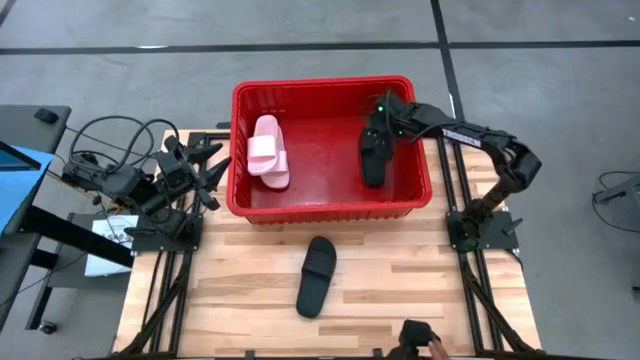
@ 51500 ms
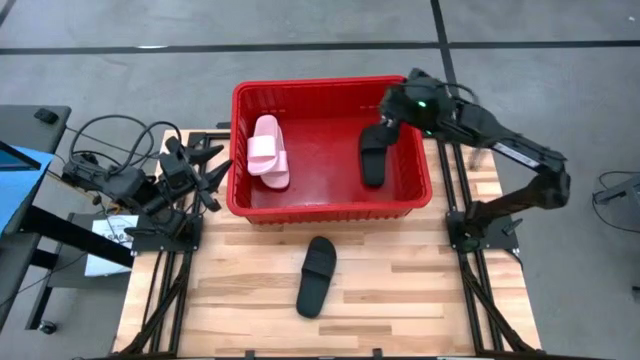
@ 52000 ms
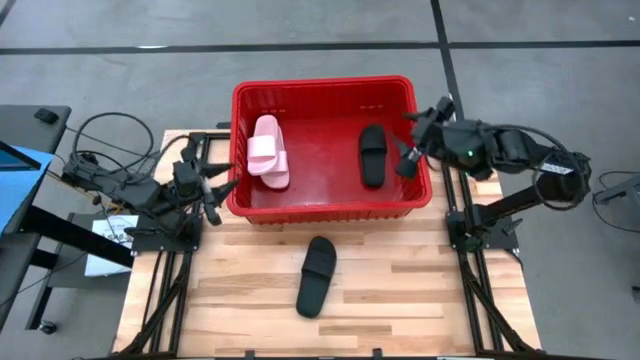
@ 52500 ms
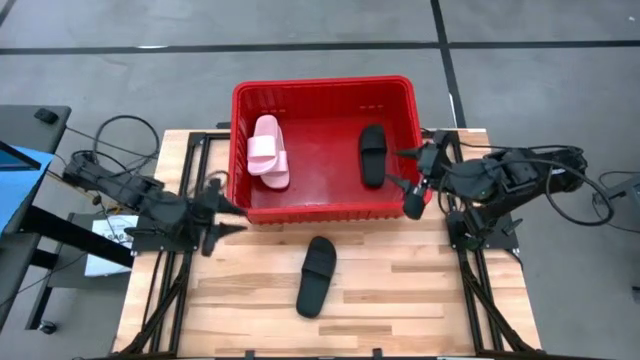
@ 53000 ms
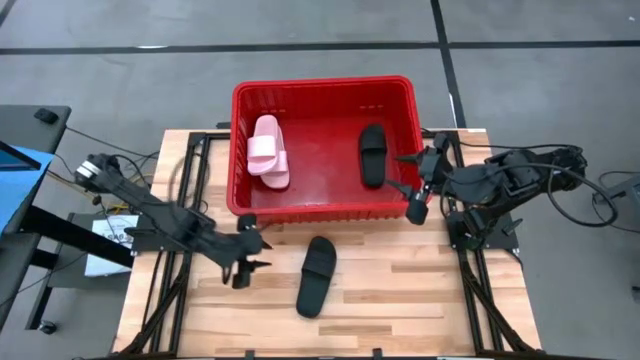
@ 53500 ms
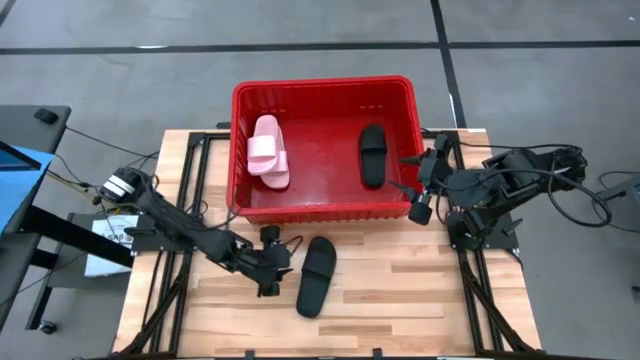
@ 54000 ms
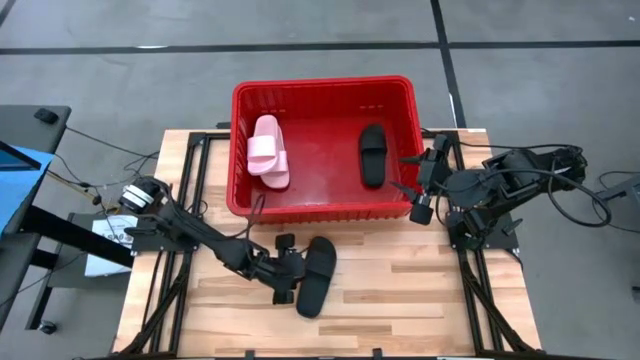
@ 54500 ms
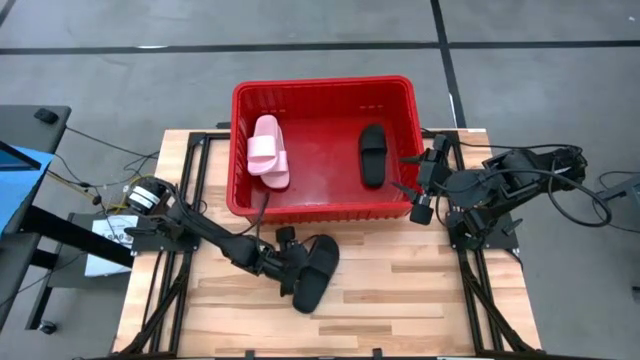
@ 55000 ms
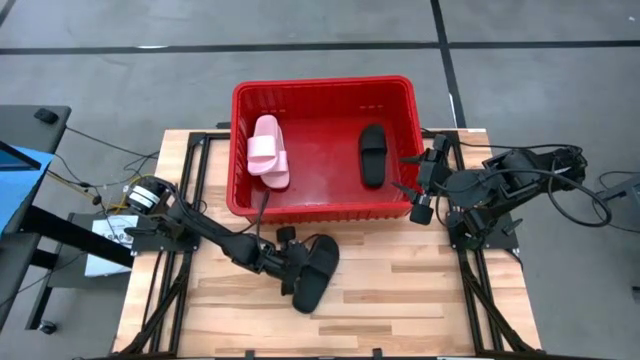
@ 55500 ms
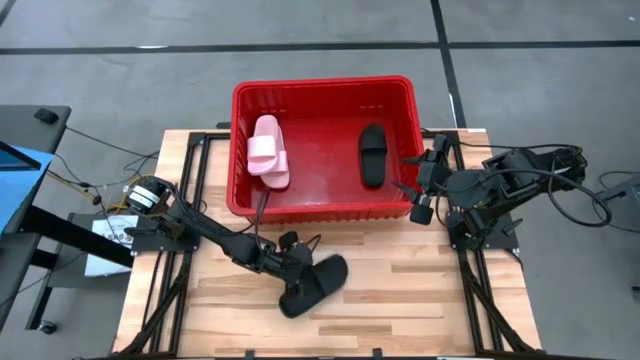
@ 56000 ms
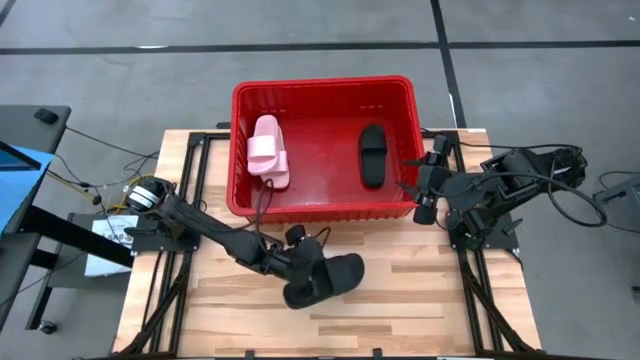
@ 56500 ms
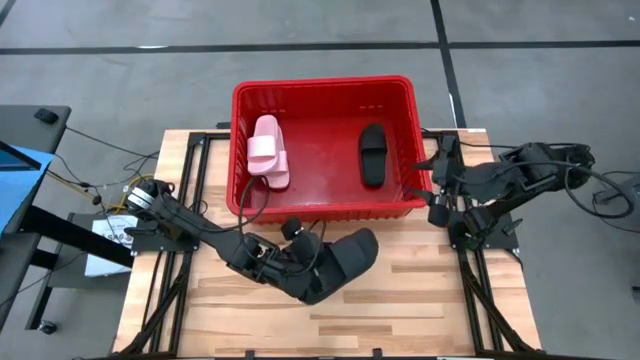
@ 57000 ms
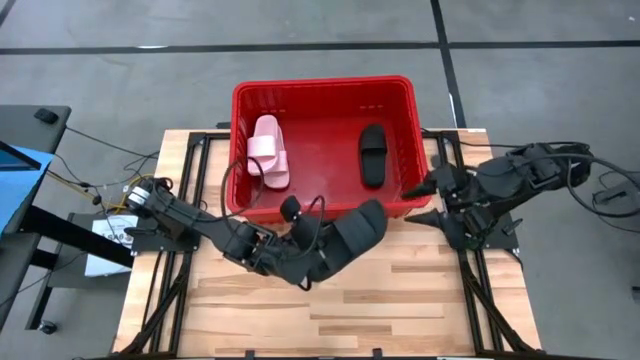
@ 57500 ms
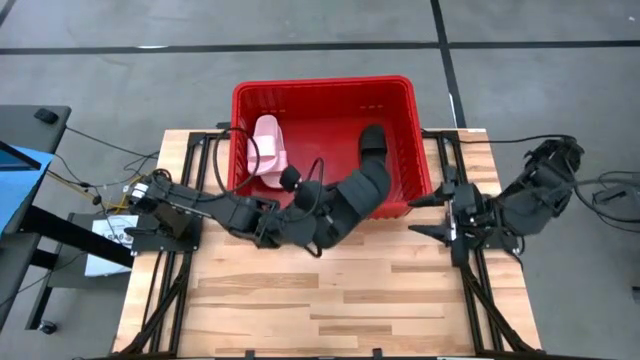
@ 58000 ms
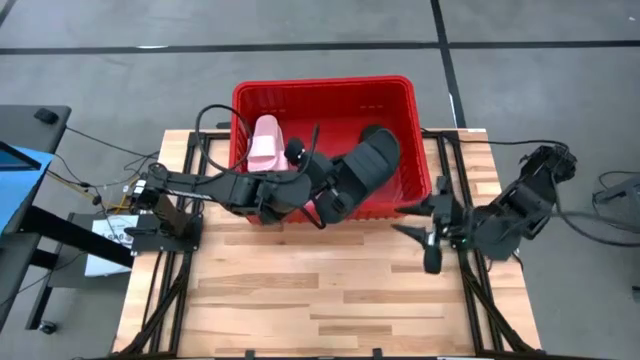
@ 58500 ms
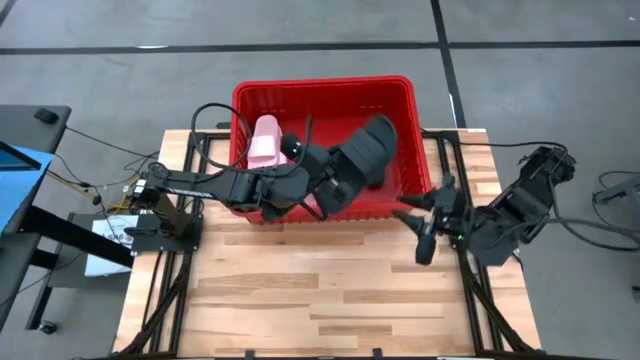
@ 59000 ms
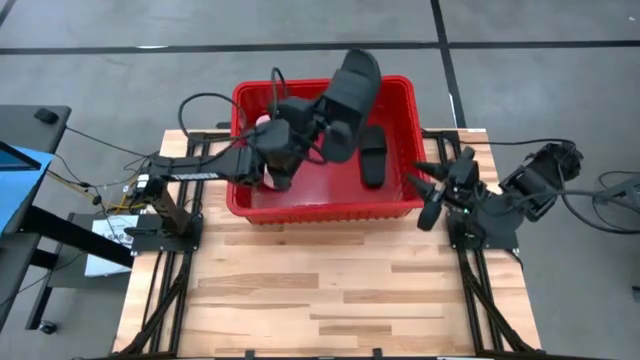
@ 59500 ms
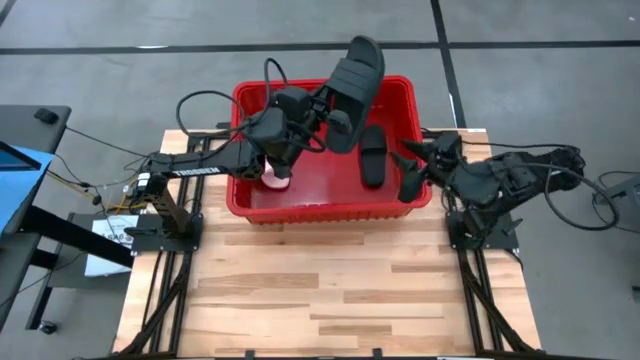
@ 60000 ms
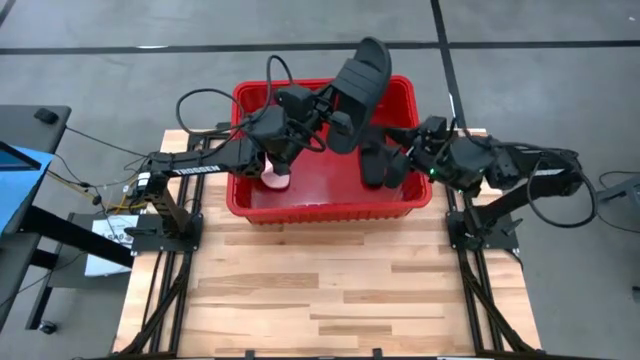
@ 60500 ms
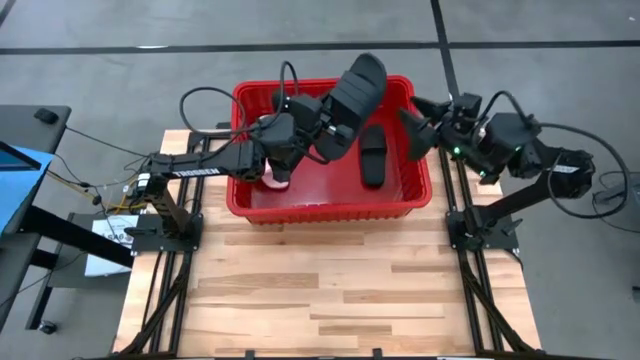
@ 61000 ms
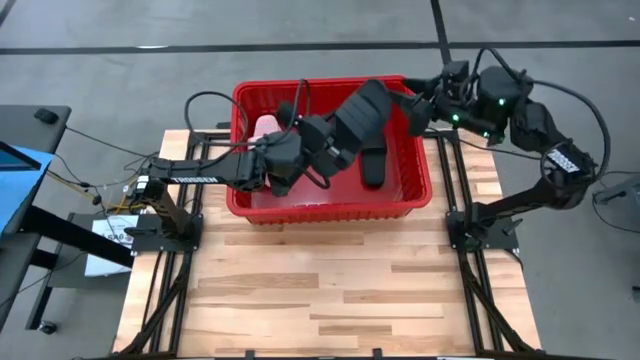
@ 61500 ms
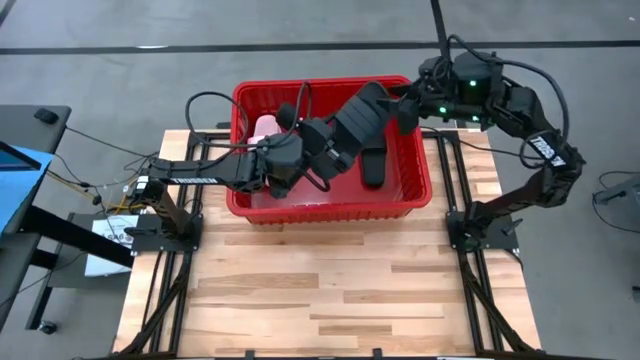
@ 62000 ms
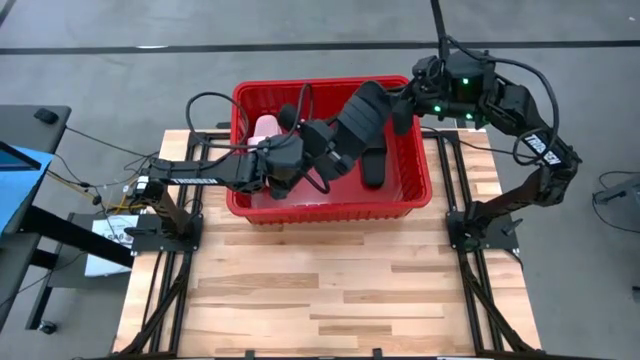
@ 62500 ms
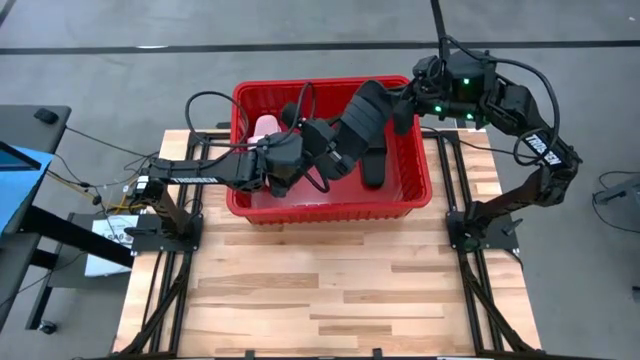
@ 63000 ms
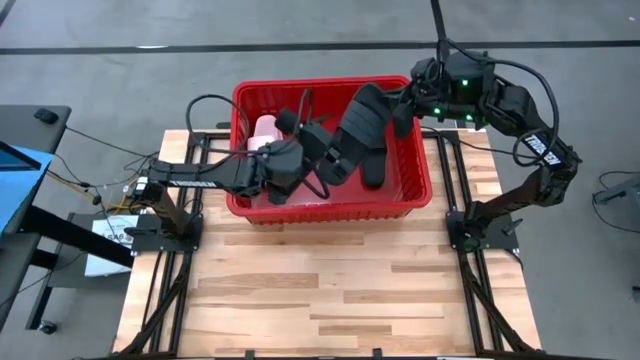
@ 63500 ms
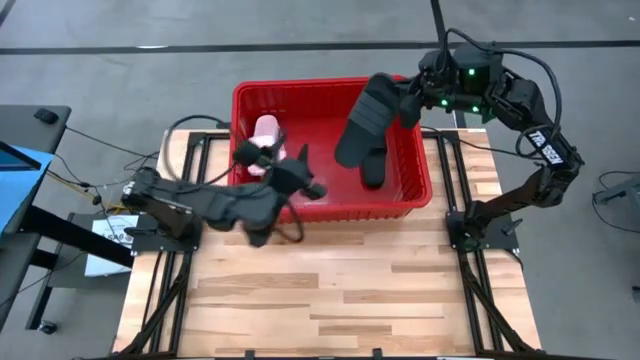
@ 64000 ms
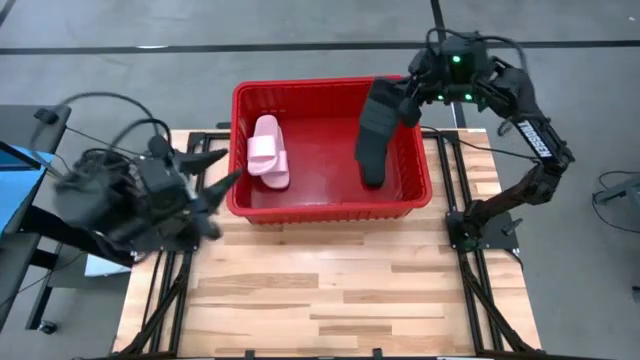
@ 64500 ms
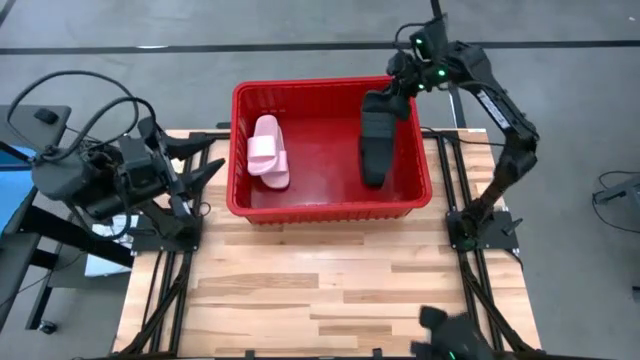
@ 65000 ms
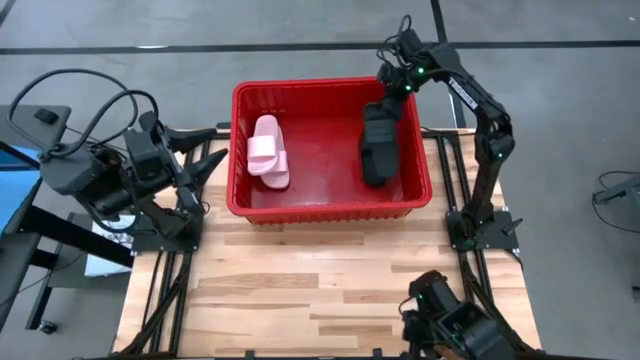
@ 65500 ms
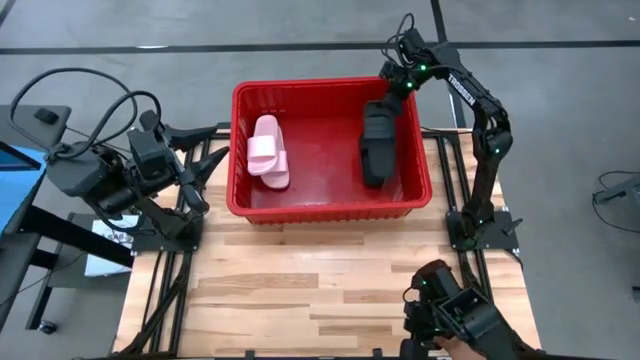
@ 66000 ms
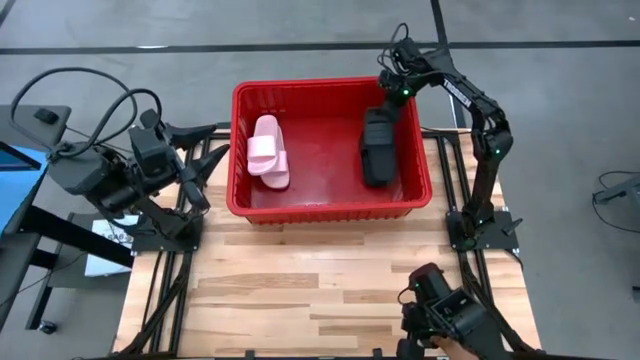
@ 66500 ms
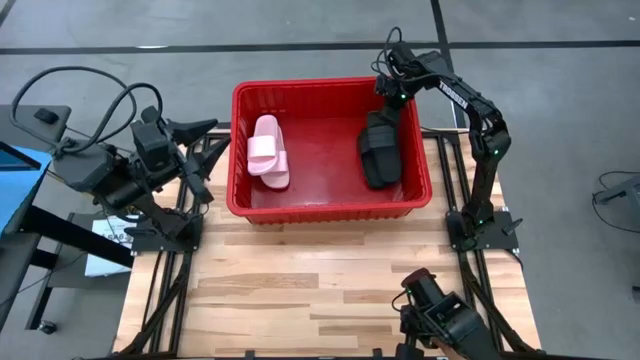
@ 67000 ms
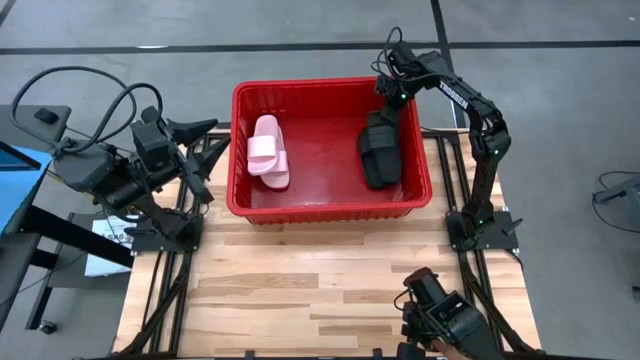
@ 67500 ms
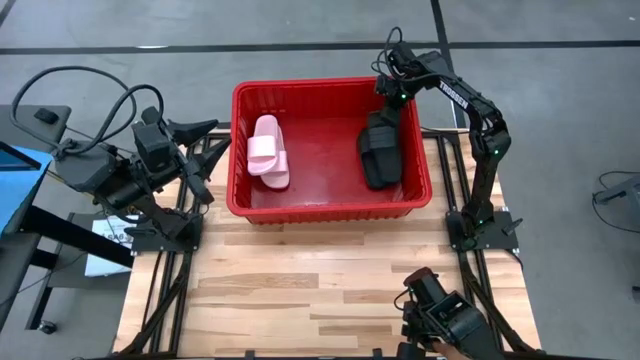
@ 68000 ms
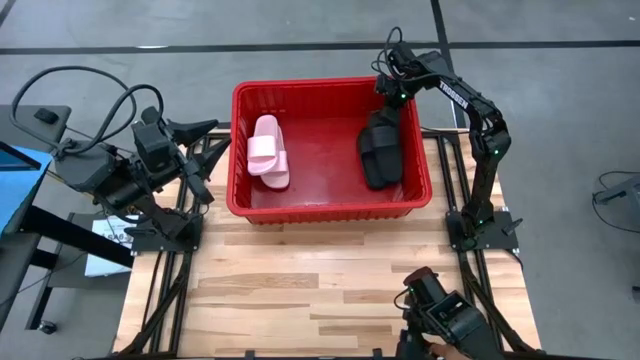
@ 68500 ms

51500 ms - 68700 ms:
Task: Pick and place slides into bin
Put the black slipper in the red bin

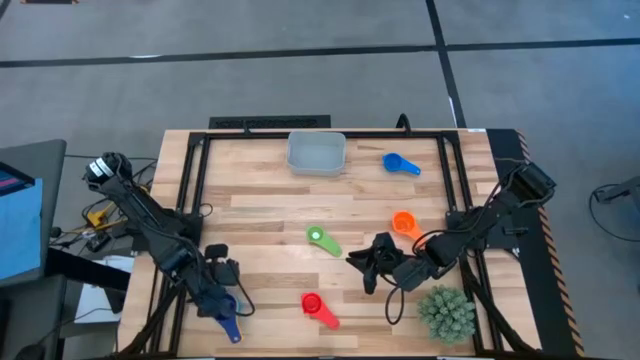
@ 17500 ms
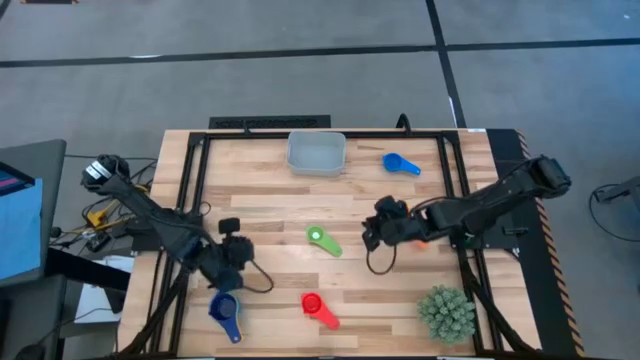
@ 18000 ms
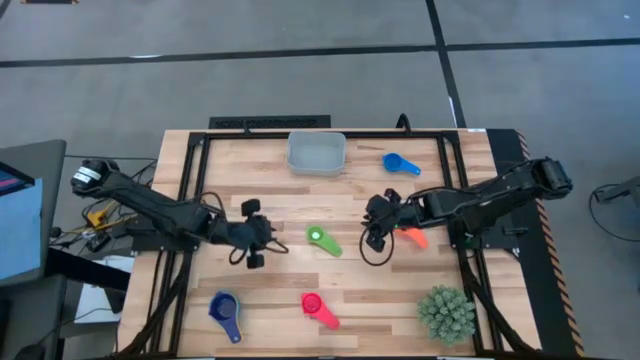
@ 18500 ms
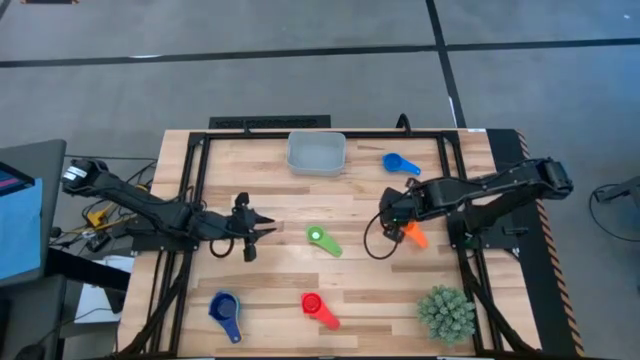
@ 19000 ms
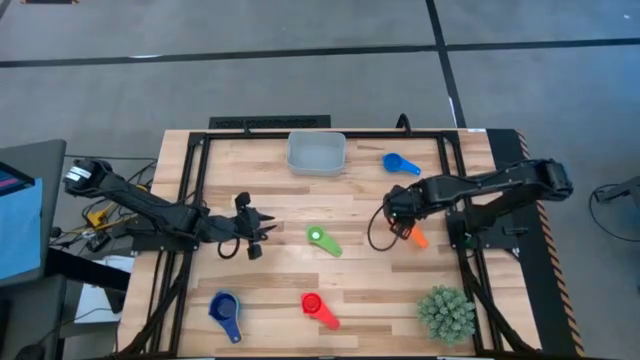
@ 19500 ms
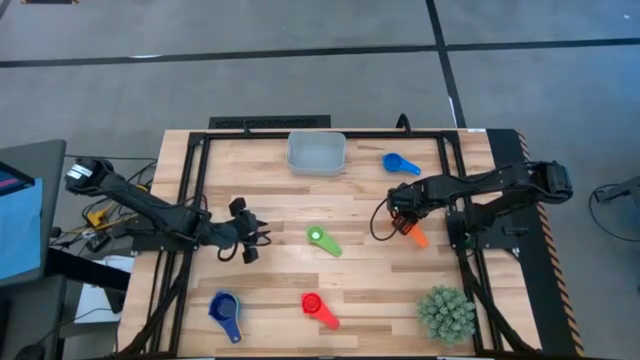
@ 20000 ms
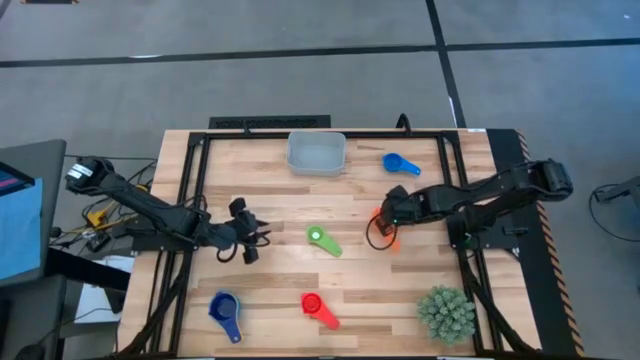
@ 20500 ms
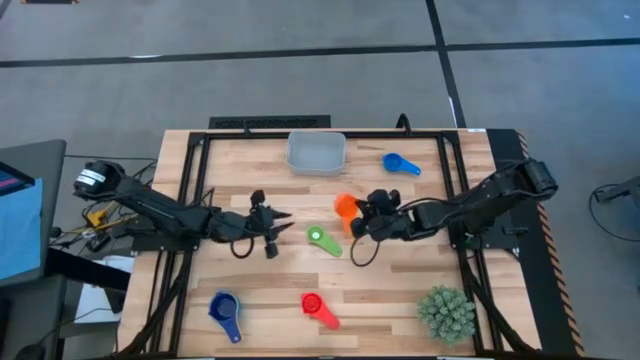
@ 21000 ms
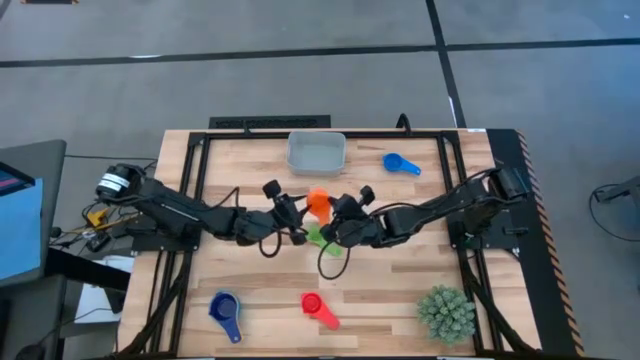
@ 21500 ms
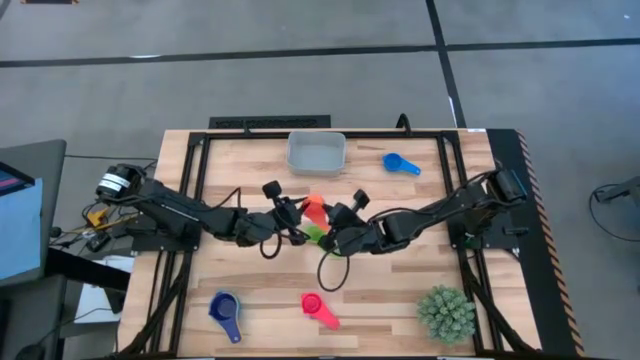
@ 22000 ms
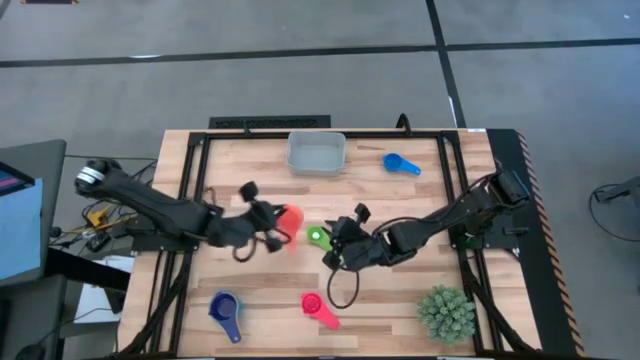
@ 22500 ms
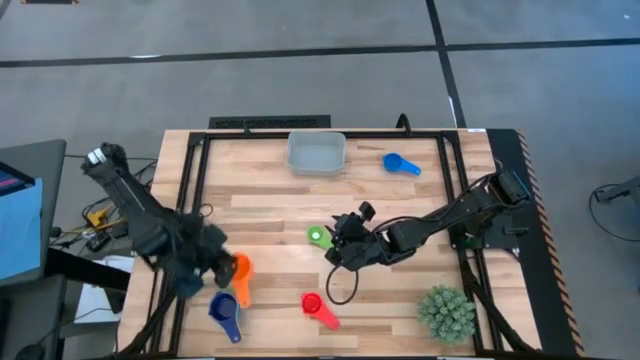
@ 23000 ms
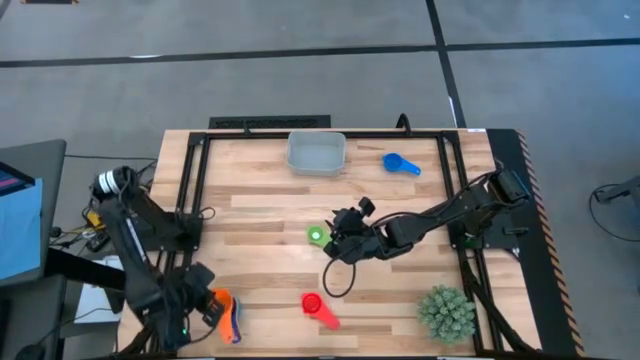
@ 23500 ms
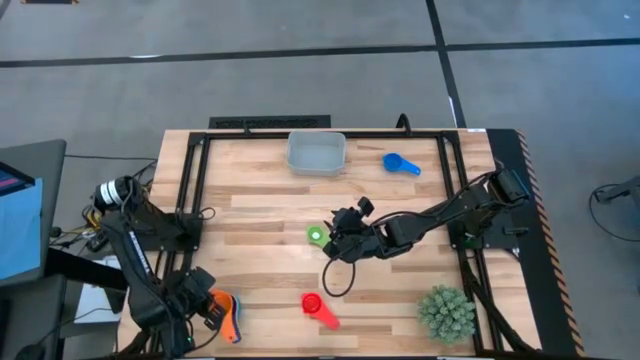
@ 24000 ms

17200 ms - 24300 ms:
Task: Nest measuring cups in basket
Stack the orange measuring cup on top of the dark blue measuring cup
